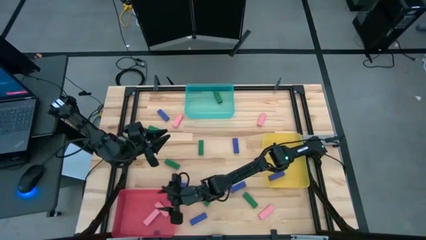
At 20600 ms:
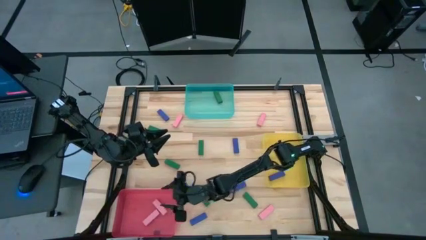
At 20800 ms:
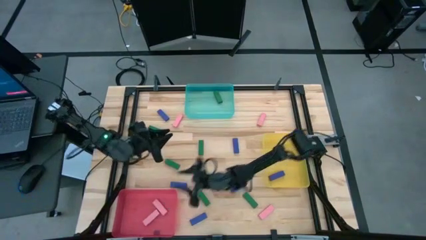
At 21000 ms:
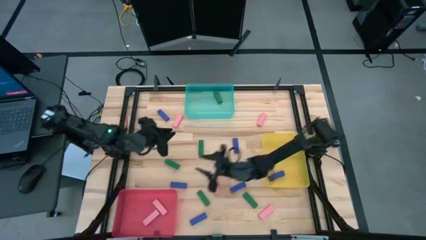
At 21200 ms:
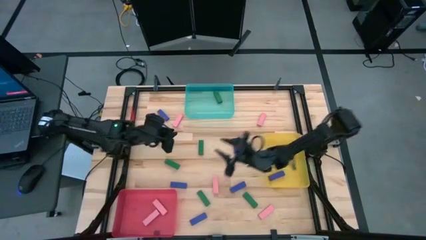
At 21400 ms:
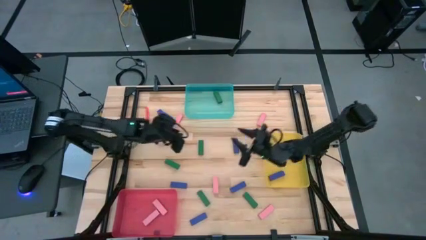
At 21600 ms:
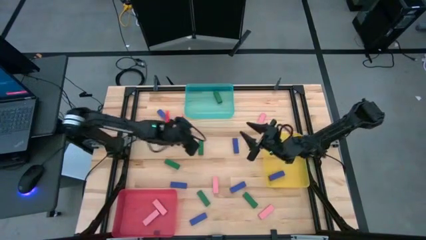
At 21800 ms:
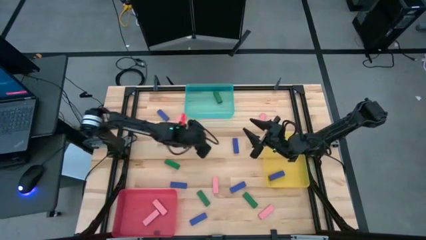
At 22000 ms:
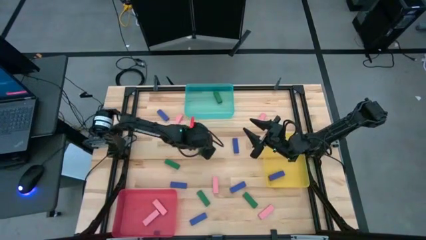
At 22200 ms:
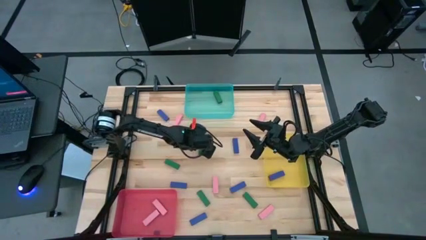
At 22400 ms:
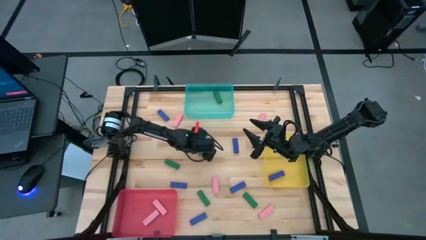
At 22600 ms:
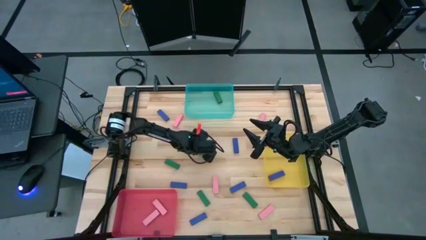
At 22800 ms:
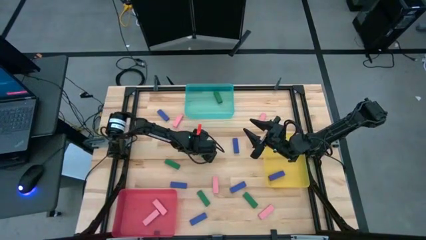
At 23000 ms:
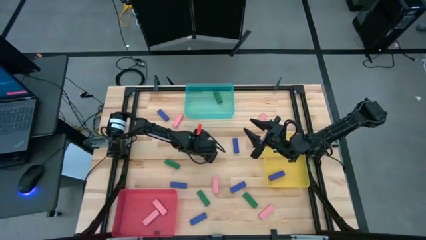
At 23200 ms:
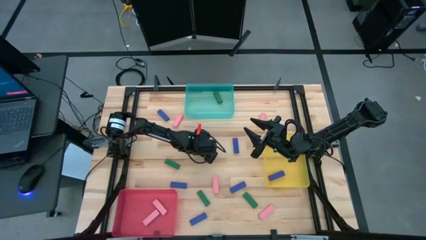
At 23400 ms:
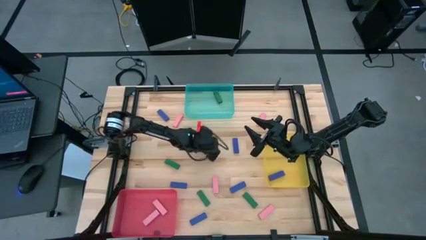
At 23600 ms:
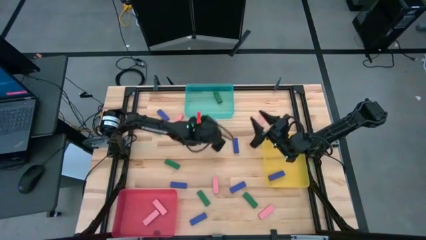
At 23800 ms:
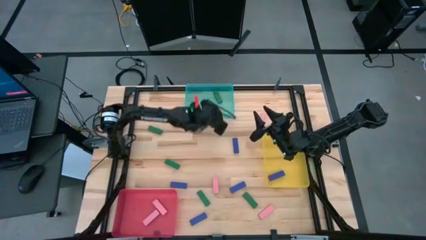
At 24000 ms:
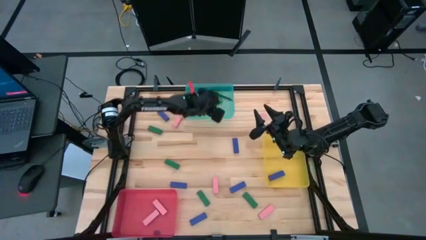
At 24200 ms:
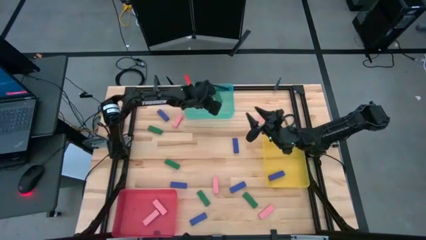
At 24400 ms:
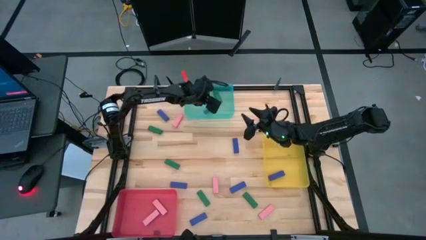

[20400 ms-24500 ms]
Task: Sort blocks
Put the green block into the blue bin

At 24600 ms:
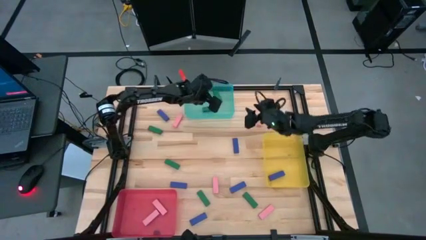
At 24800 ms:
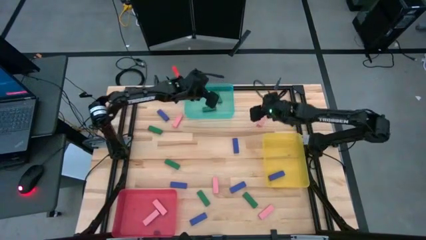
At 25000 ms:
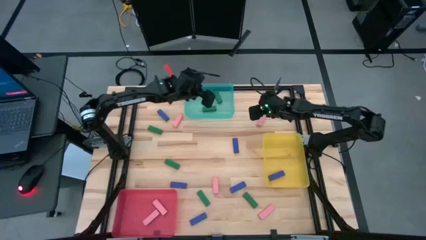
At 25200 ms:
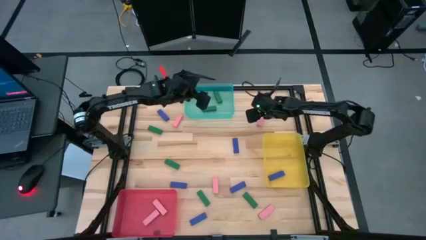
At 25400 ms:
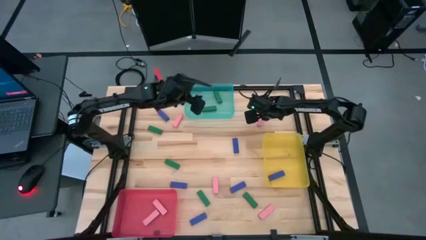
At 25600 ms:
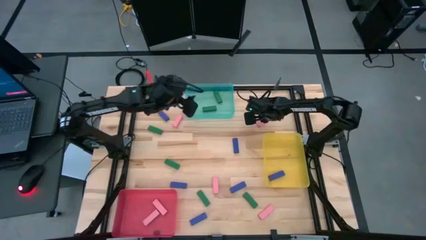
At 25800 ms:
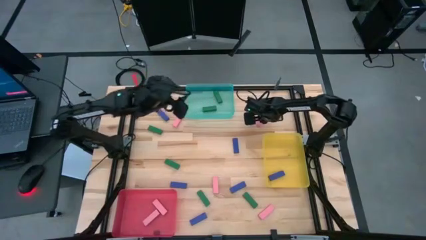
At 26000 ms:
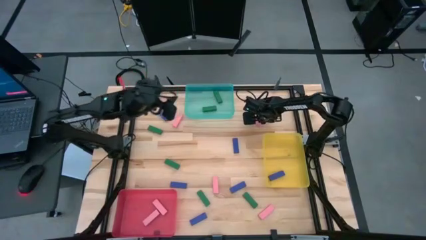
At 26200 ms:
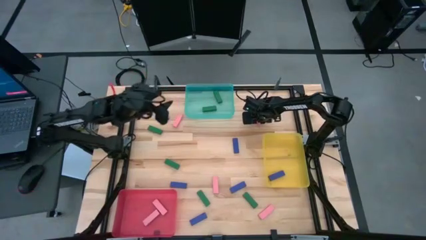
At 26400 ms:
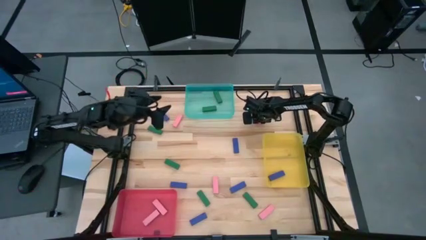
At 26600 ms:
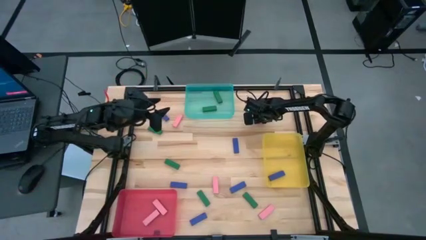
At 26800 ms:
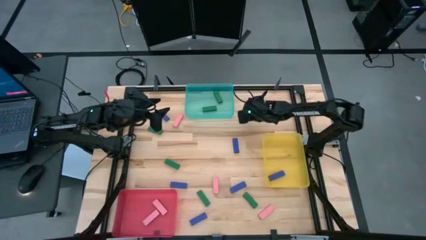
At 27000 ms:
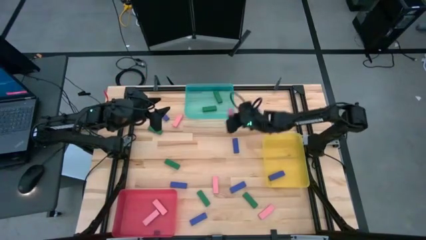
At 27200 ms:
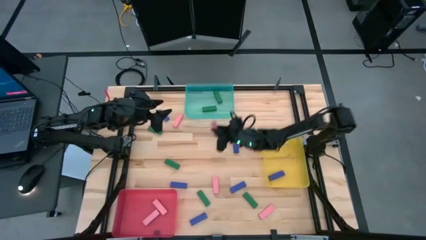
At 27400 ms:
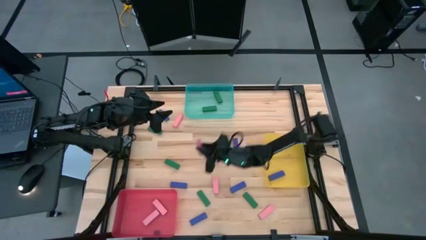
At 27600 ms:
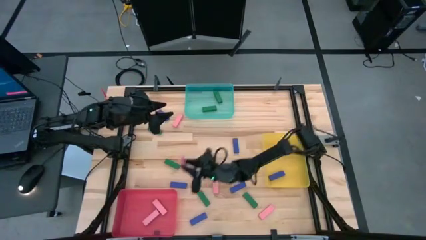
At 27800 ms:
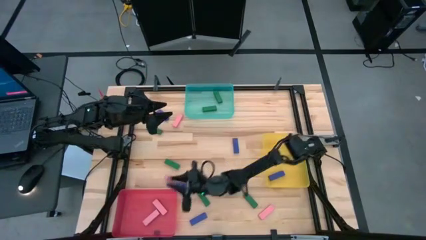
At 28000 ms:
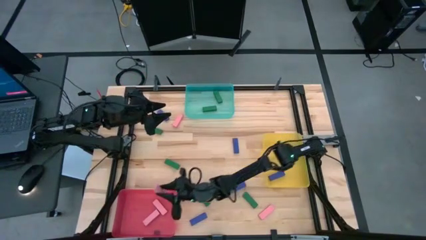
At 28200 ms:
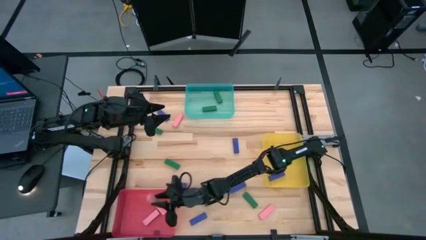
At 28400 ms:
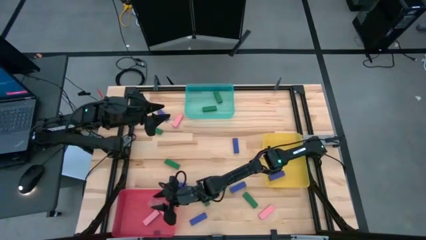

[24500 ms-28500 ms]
Put the pink block into the red bin

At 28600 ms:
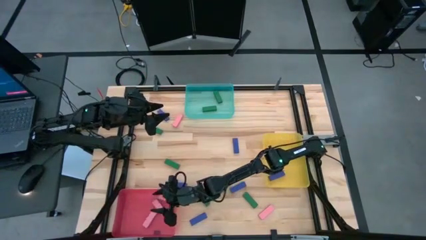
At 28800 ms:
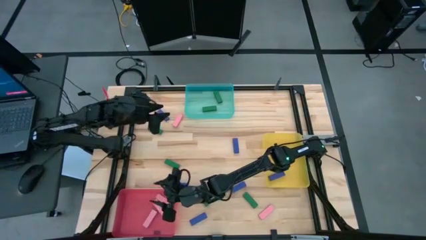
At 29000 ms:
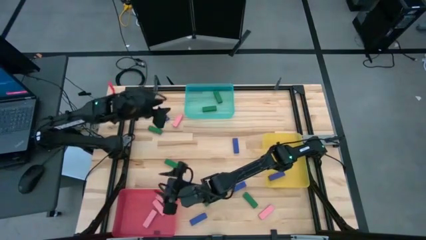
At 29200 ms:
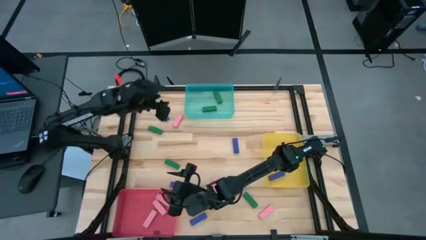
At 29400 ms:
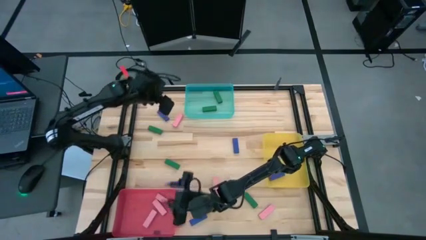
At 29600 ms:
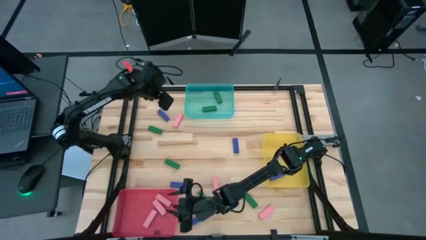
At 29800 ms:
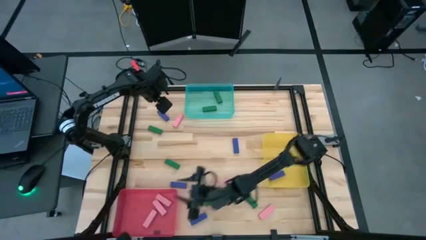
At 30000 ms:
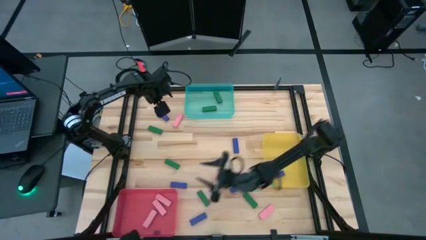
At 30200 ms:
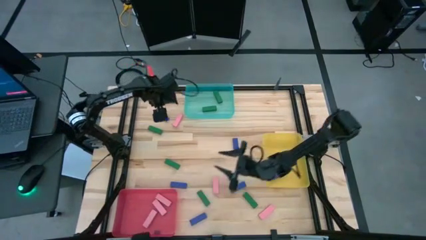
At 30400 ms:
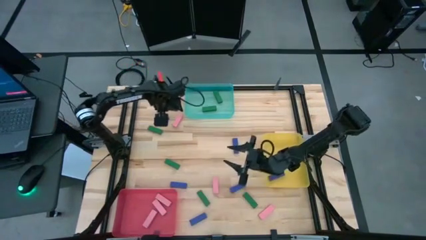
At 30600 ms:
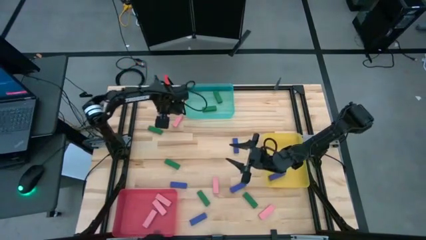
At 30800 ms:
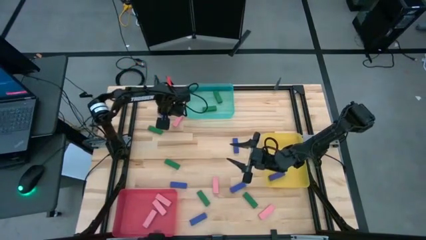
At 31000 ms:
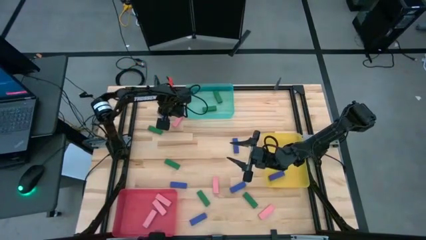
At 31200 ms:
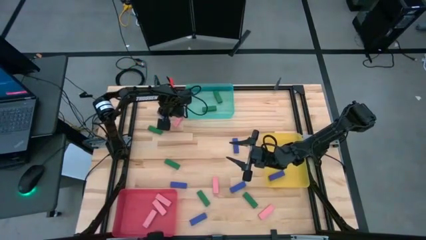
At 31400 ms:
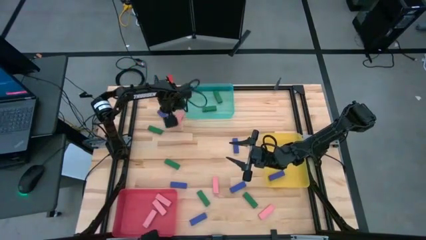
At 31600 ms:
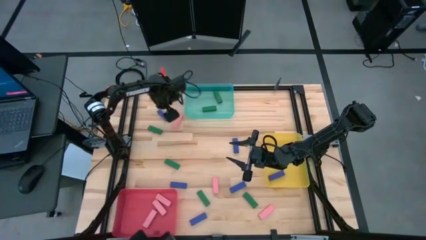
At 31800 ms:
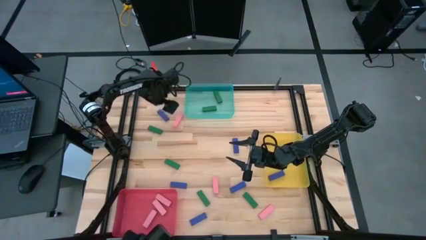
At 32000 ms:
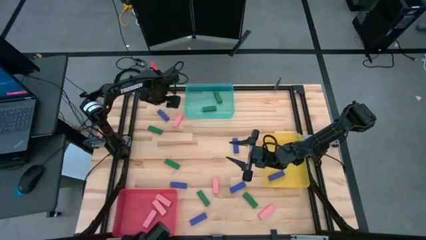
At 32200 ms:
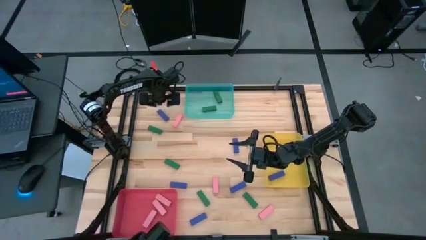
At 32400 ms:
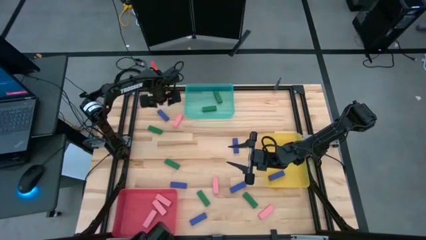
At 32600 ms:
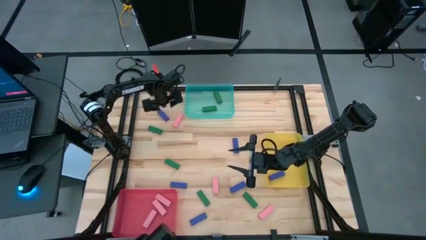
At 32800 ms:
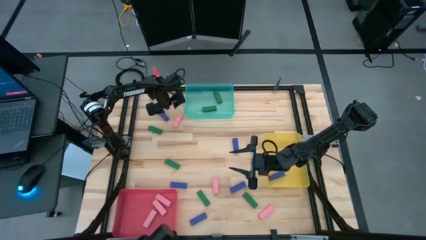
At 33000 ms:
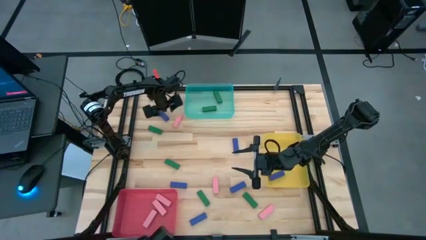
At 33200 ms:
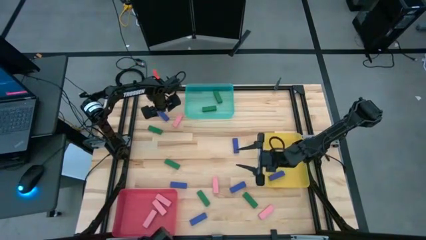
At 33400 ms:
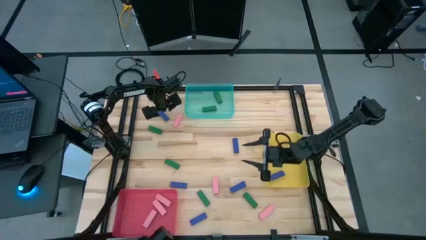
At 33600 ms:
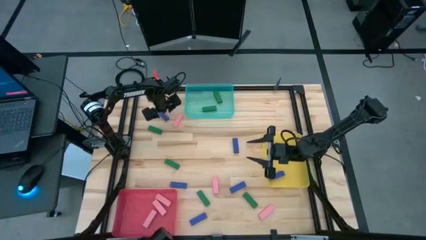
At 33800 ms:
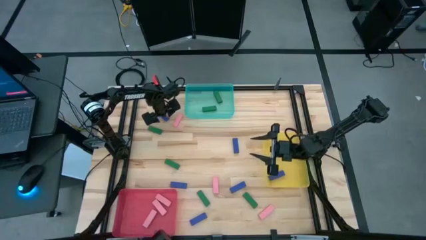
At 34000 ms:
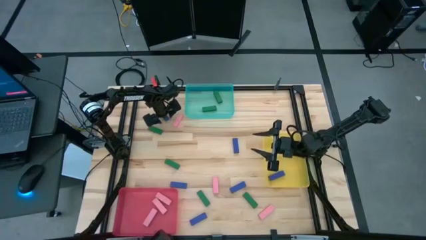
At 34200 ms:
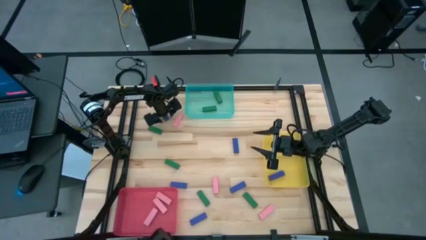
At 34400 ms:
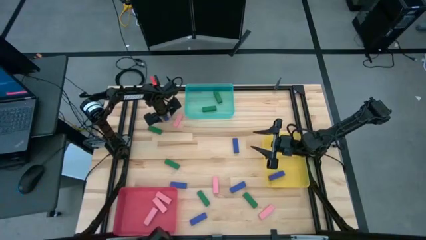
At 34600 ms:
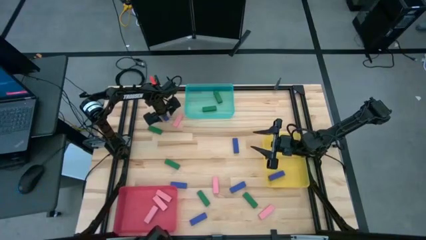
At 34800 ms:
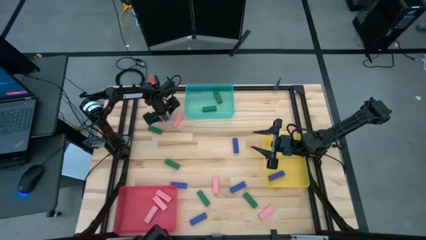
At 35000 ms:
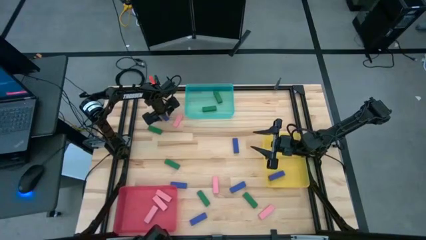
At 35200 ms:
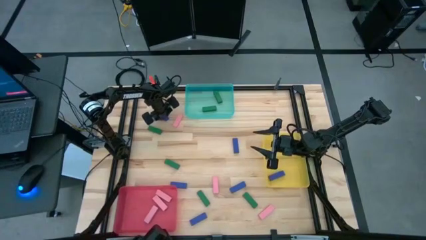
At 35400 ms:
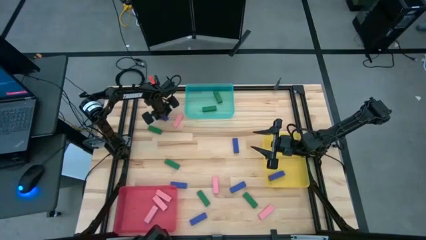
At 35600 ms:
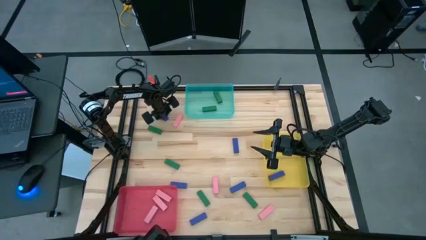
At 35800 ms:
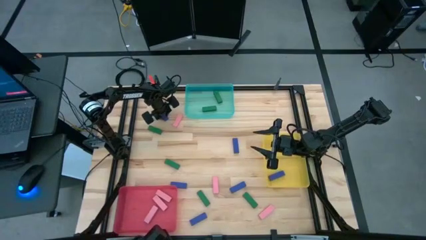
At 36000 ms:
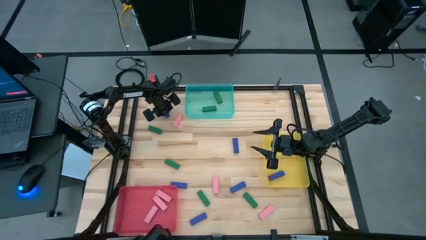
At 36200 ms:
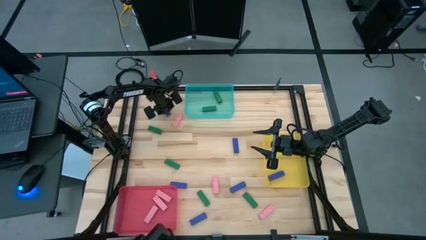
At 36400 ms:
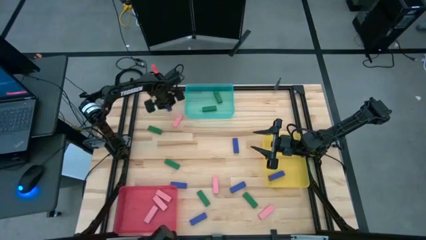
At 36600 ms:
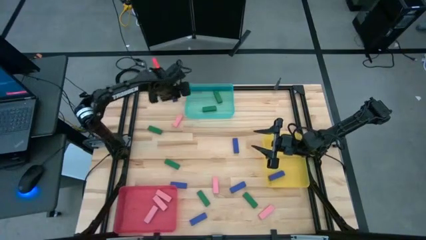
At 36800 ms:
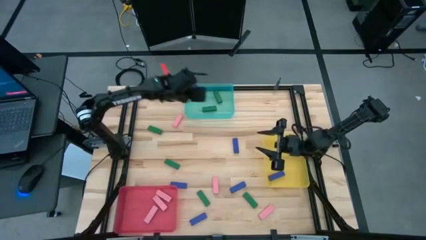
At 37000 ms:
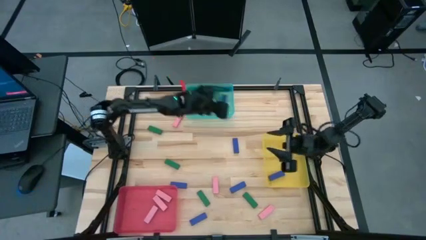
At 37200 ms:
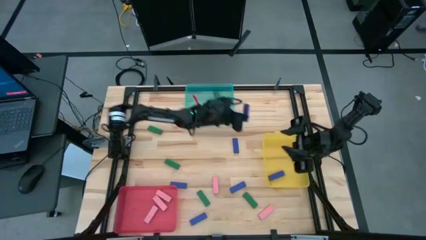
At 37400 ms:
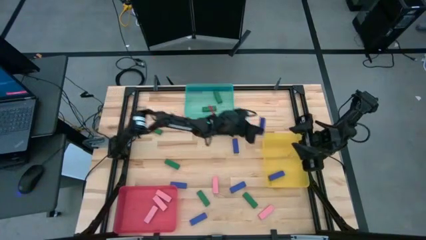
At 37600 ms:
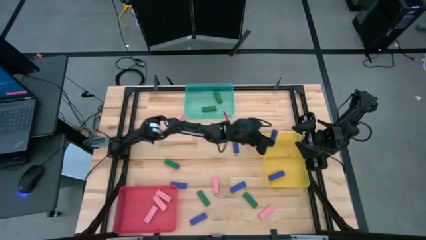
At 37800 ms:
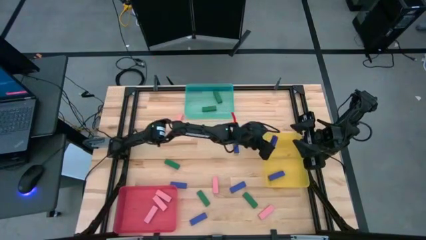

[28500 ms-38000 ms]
Put the blue block into the yellow bin
